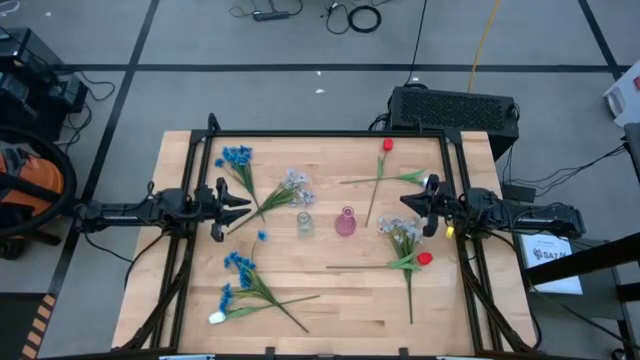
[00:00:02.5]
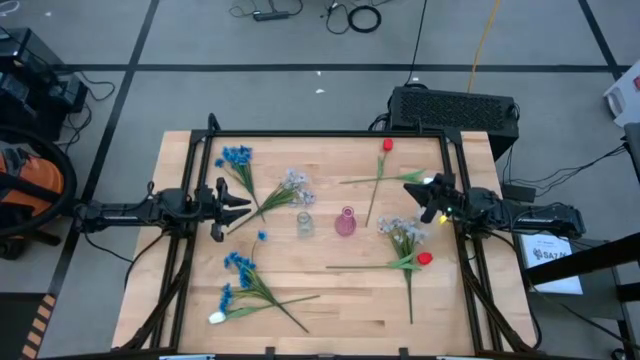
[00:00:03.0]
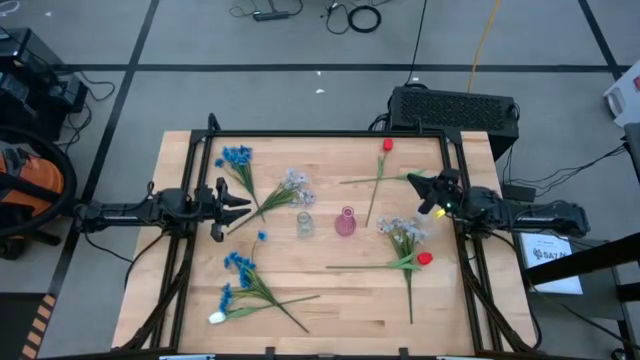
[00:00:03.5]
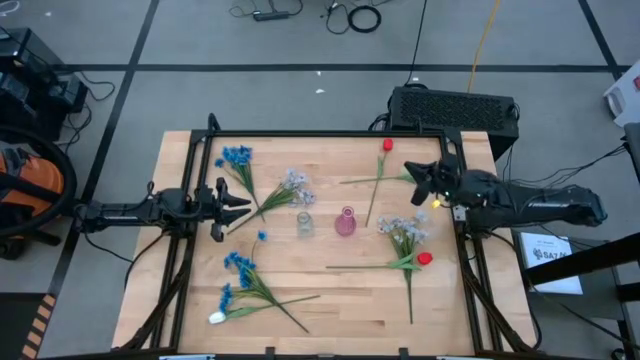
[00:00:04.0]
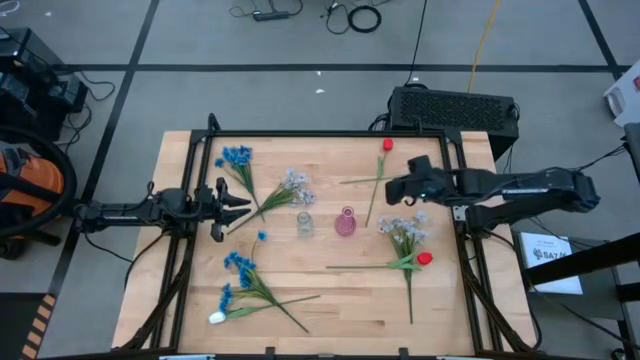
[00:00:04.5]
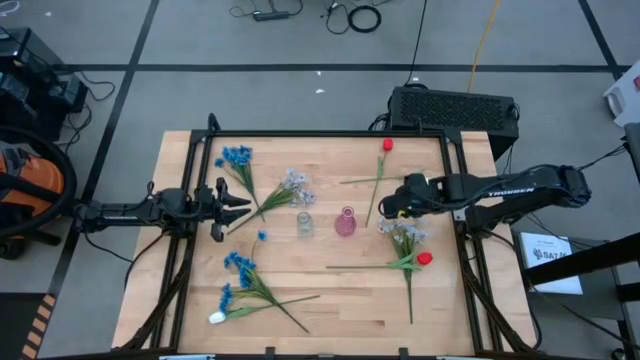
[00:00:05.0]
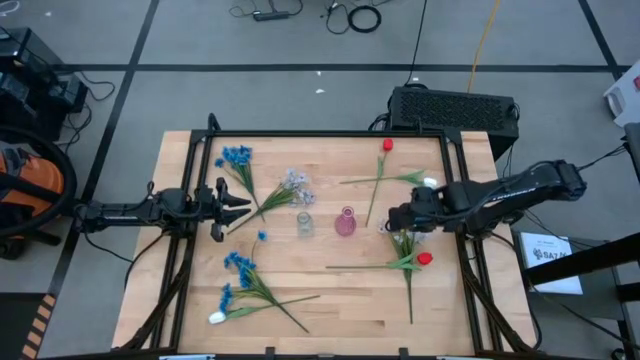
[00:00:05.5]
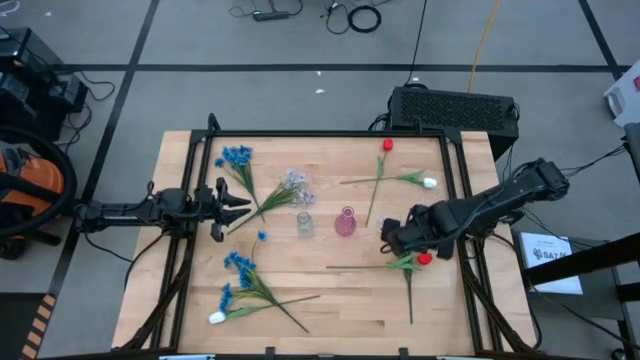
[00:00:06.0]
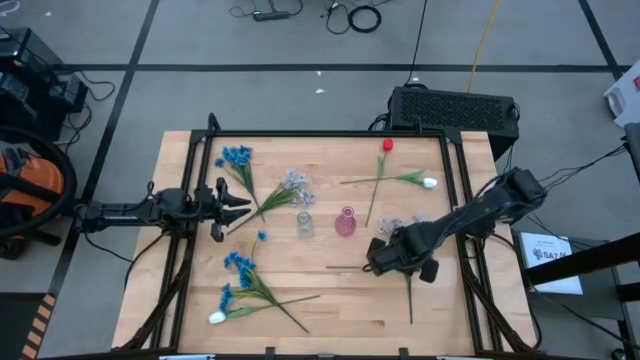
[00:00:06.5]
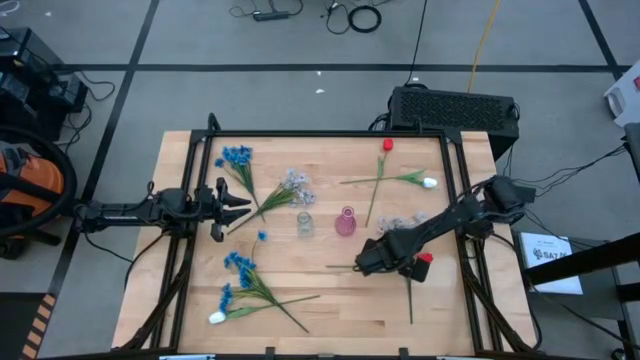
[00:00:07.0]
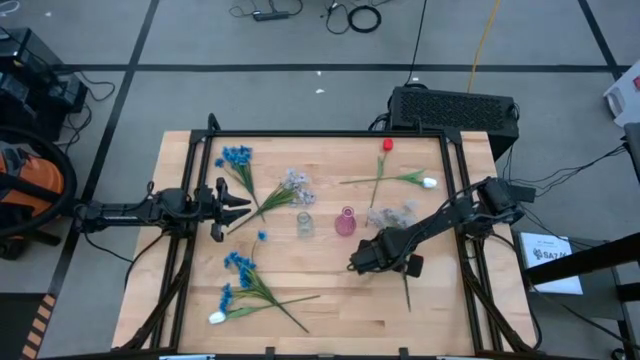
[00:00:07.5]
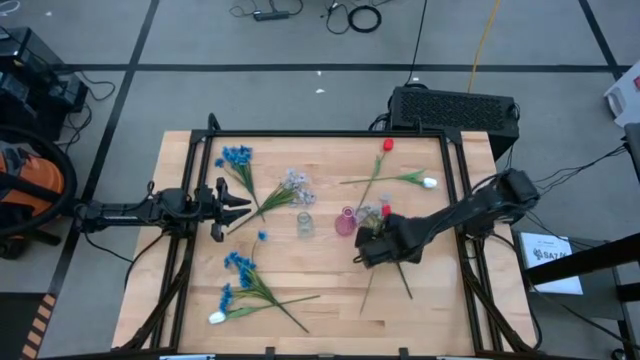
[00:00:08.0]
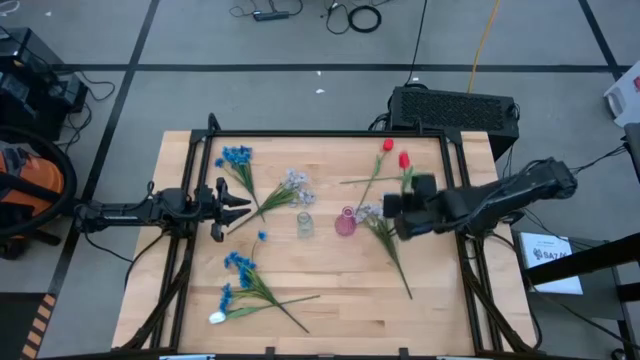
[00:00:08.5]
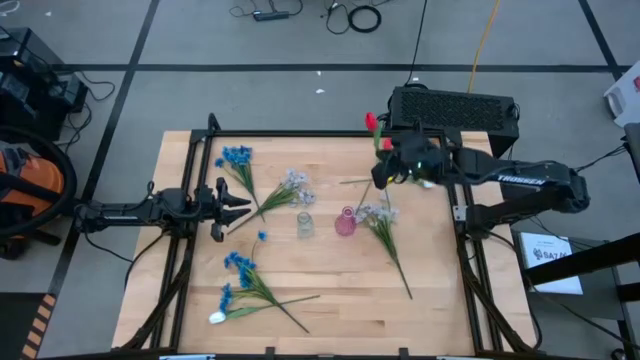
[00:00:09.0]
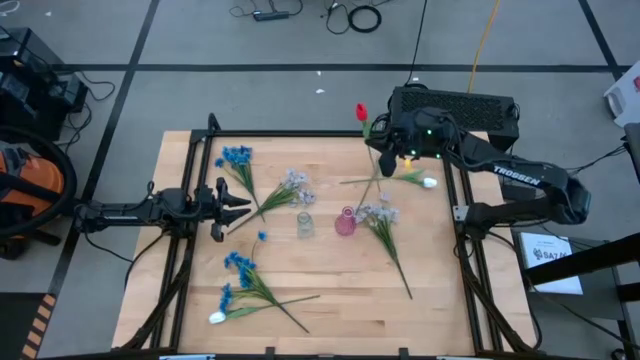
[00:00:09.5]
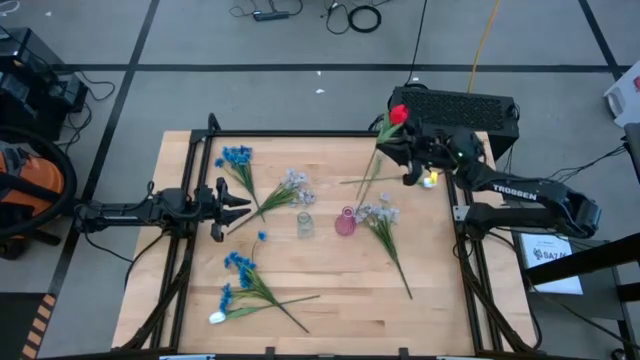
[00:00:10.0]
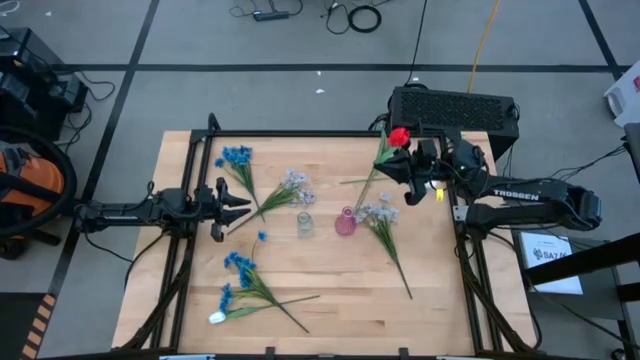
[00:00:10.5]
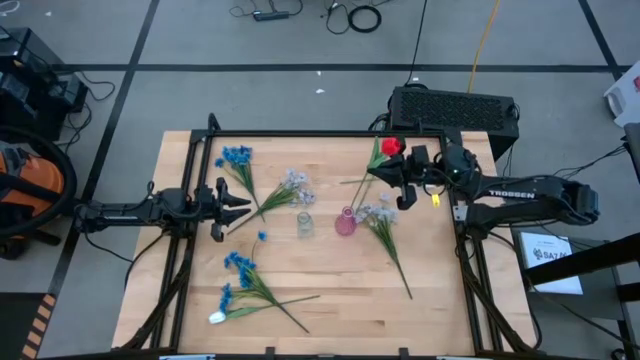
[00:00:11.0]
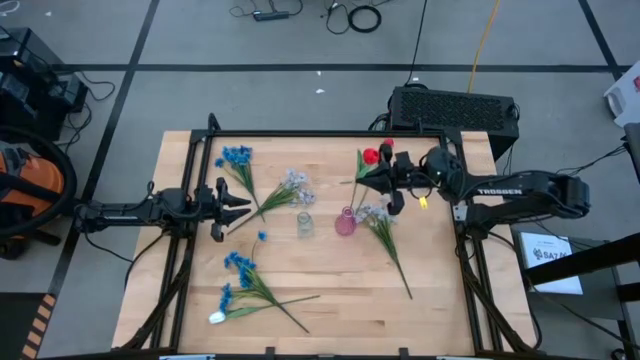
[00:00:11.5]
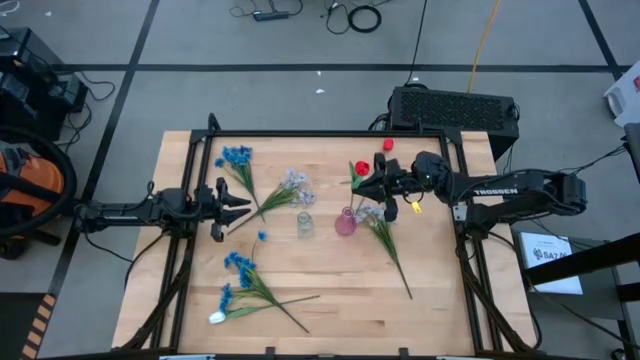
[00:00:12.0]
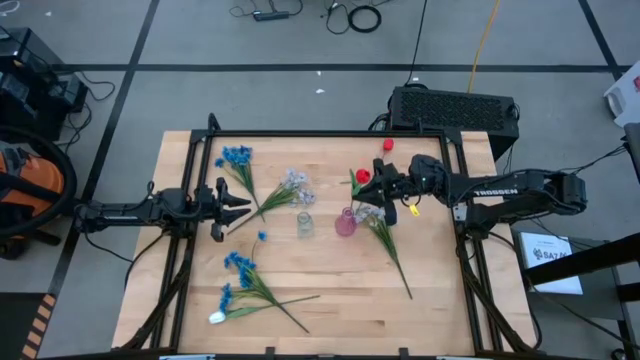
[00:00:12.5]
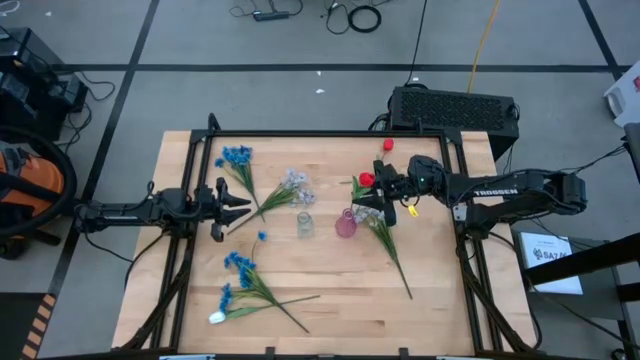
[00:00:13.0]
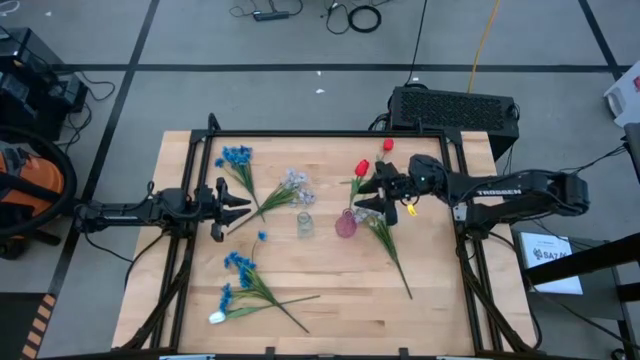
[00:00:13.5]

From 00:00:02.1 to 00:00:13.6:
Task: Sort flowers into vase by color
Put the bottom red flower into the pink vase

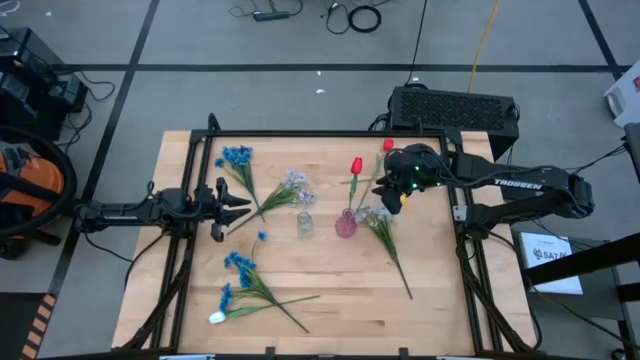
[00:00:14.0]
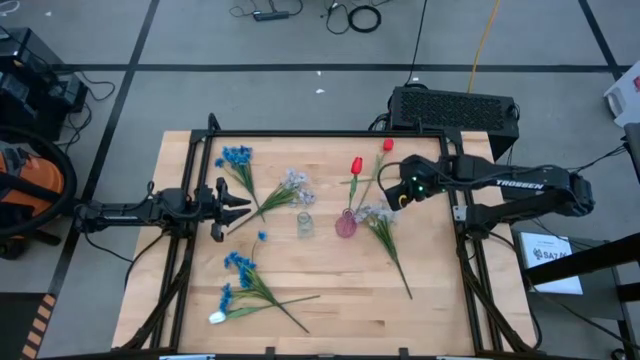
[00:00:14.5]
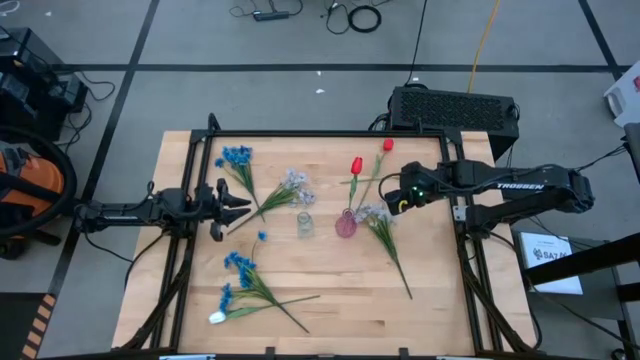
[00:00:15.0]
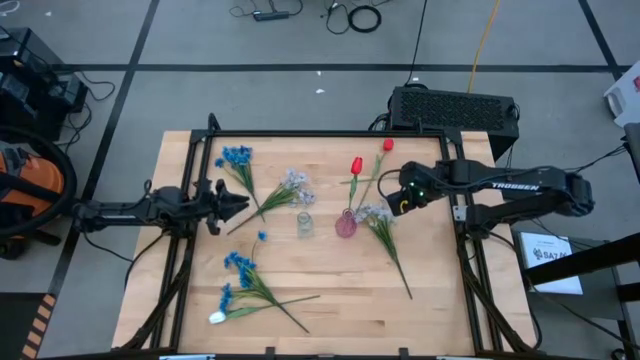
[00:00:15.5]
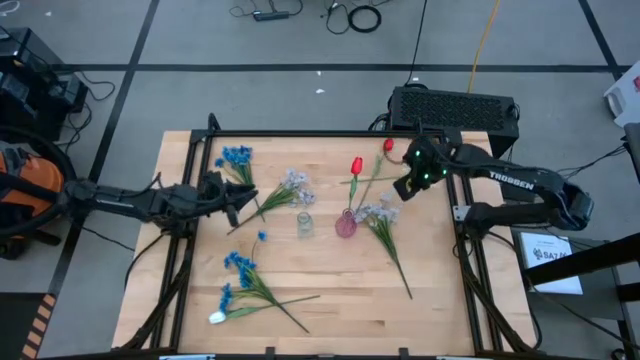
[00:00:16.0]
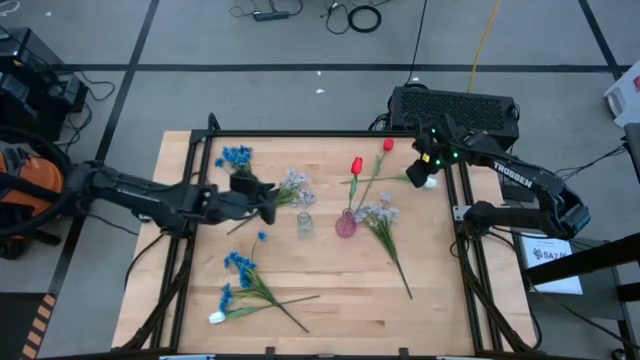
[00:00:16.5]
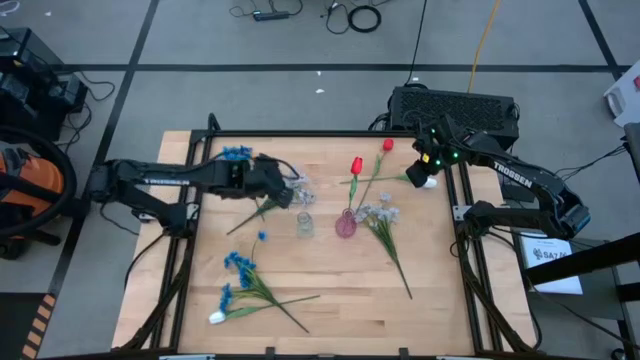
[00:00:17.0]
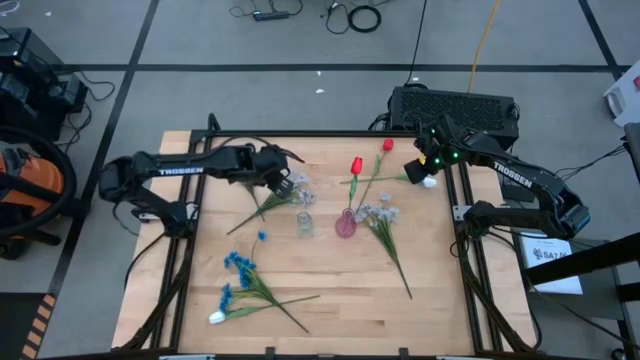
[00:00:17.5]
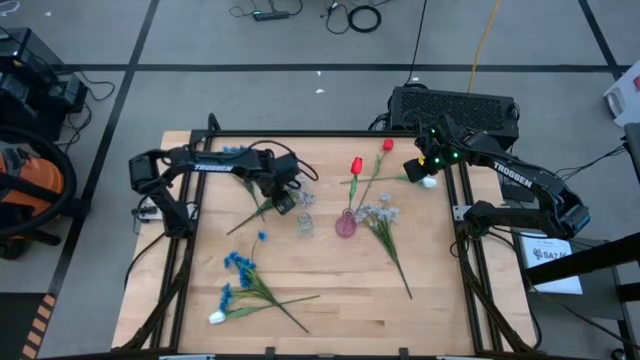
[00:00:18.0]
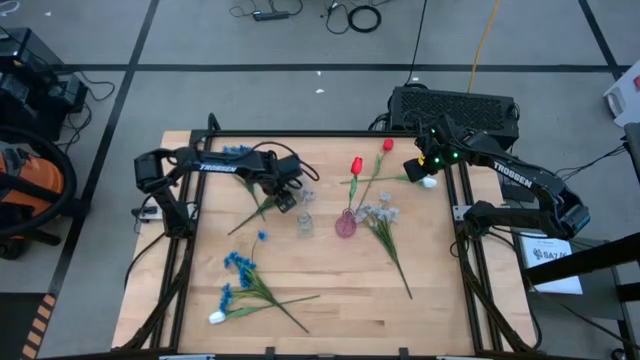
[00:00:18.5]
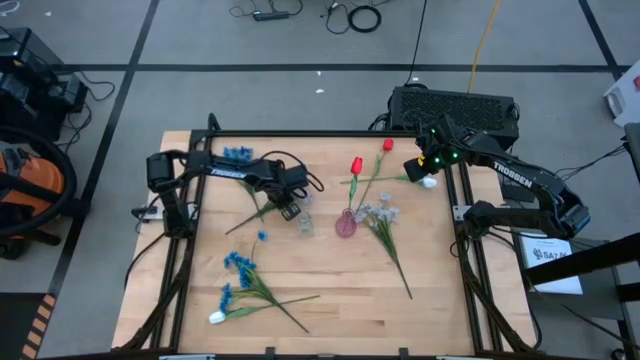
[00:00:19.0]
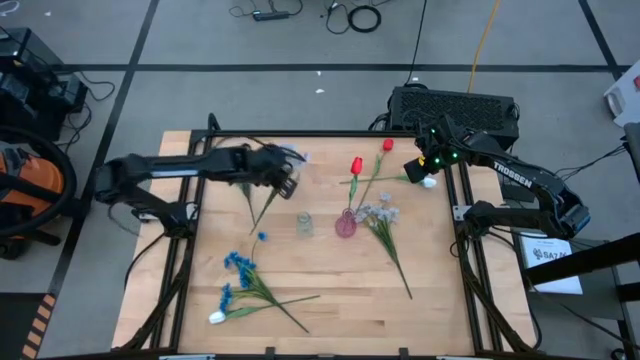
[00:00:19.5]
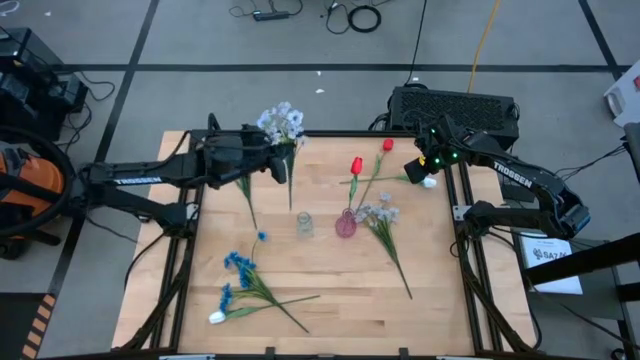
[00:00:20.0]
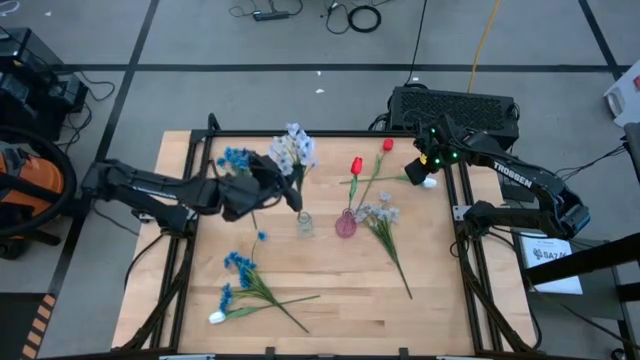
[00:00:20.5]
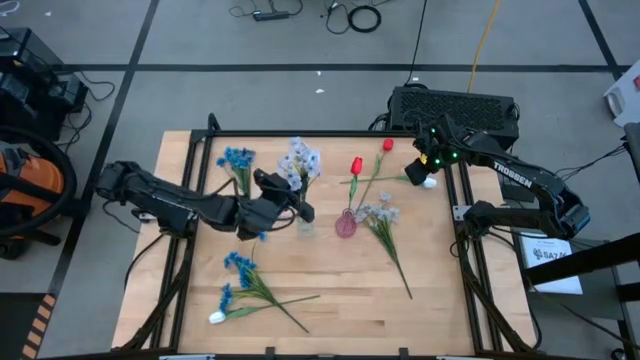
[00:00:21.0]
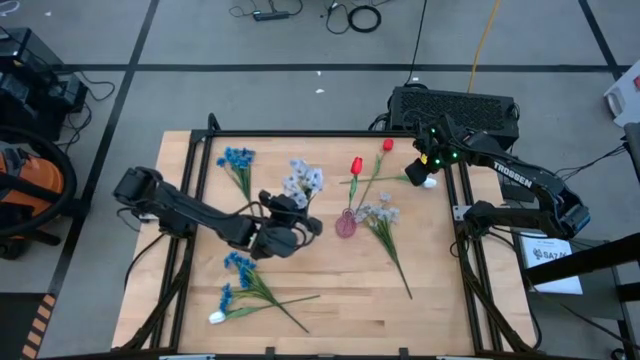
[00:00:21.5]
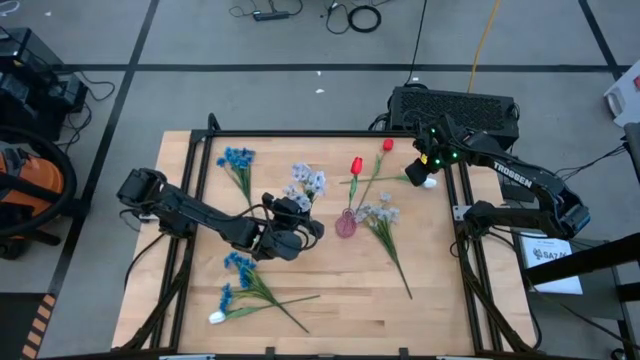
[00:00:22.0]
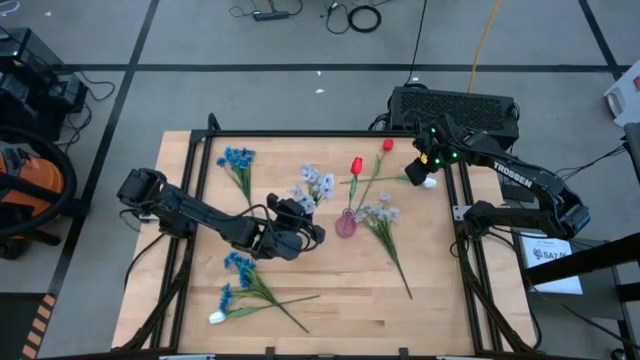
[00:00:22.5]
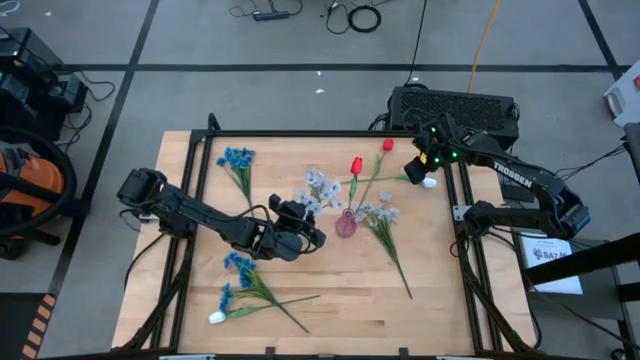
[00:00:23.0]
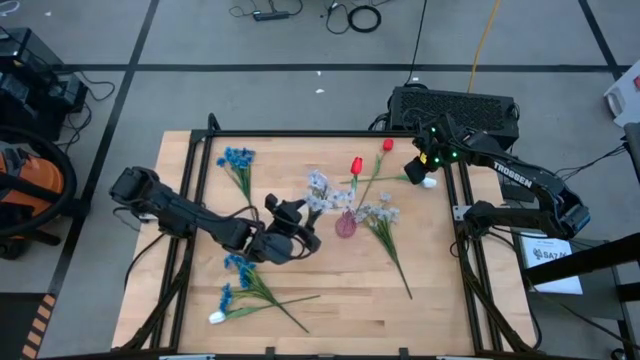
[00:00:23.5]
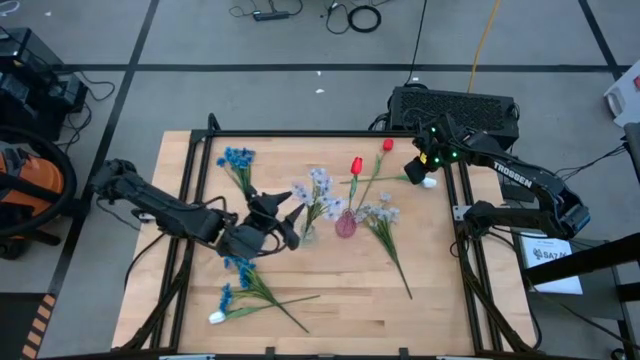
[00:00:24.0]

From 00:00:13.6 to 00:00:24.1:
Put the top white flowers into the transparent vase
